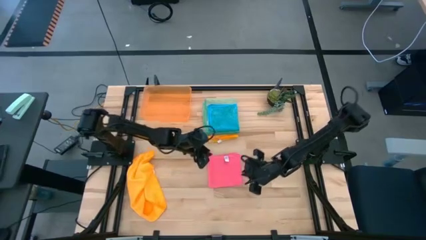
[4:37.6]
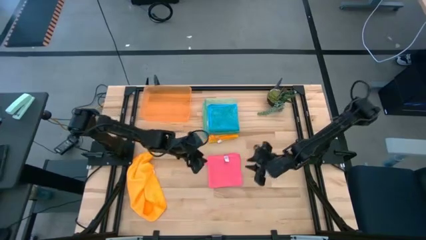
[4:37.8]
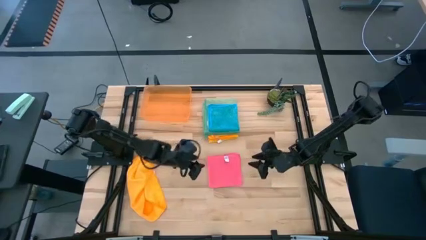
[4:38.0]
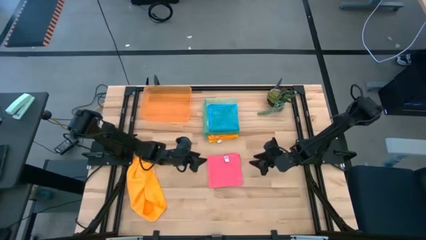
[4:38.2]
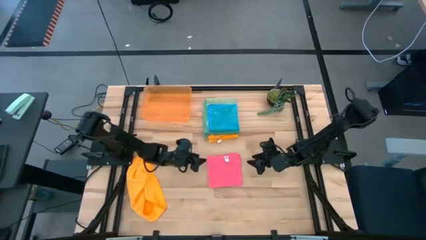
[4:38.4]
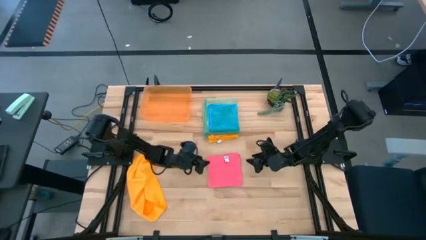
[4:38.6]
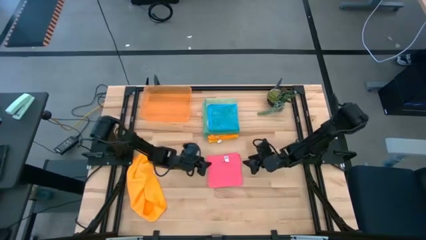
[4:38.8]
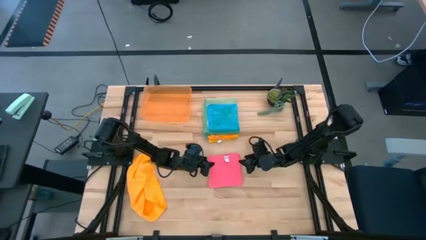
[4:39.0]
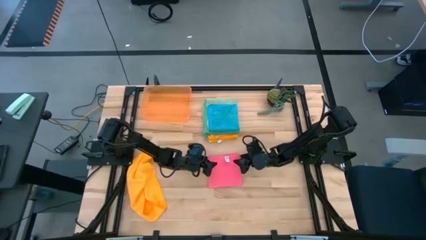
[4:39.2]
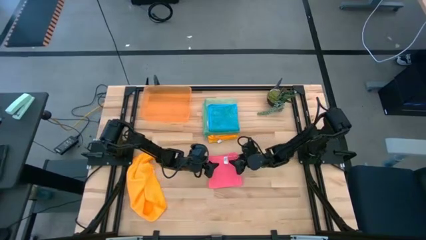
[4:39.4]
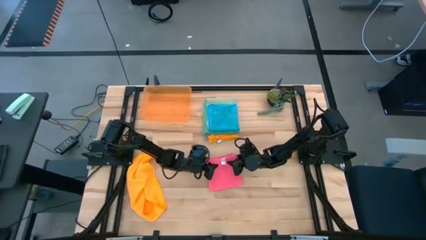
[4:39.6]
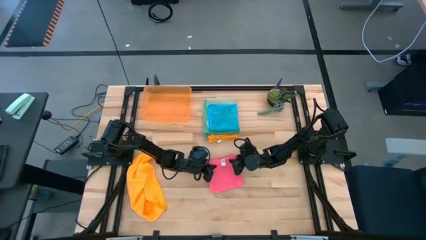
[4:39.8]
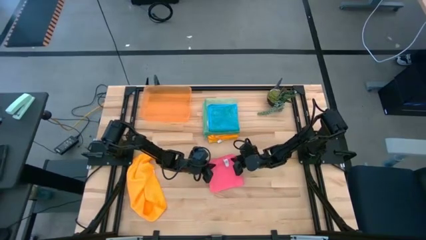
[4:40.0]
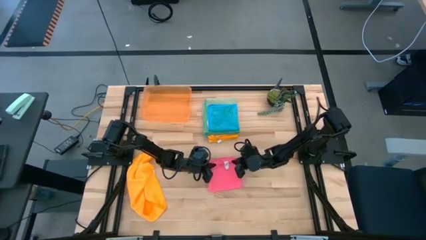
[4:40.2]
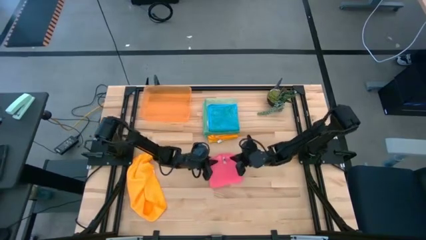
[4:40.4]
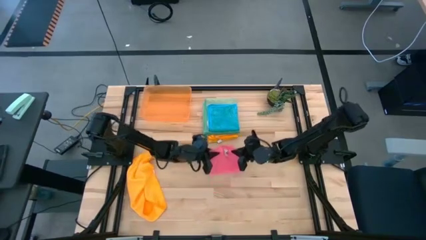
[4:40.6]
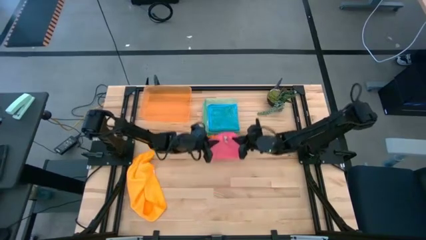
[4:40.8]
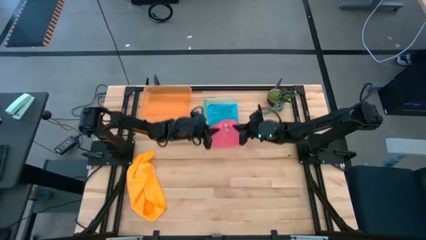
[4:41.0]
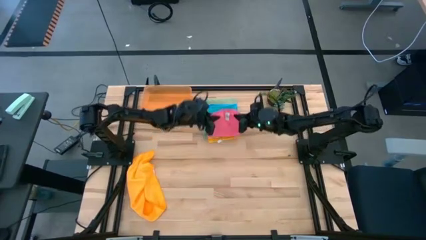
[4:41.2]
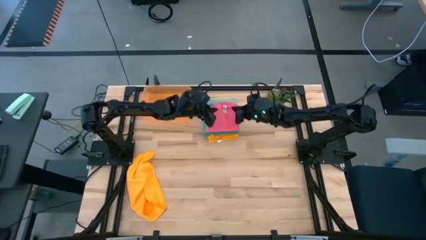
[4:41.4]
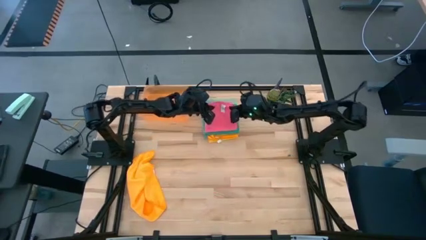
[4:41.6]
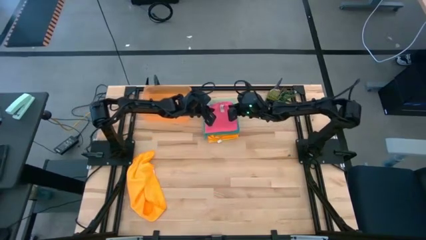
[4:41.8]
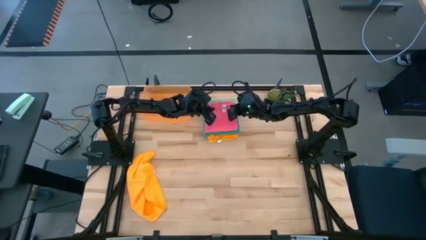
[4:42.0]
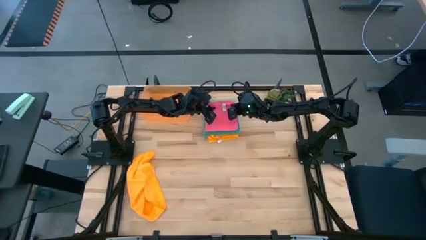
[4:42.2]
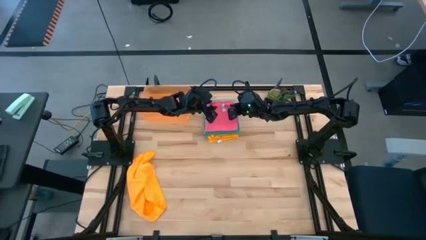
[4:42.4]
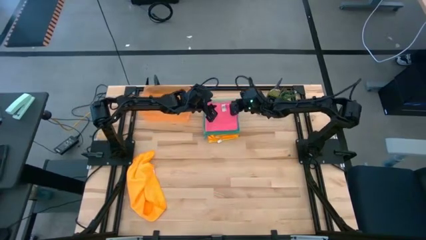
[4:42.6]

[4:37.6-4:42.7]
Task: Fold microfiber towels
Stack the folded pink towel on the folded blue towel

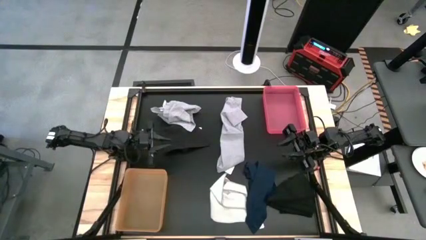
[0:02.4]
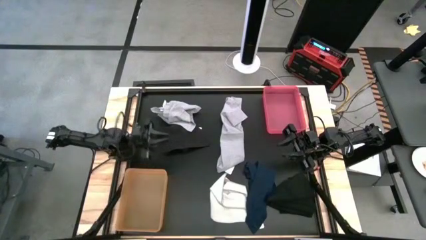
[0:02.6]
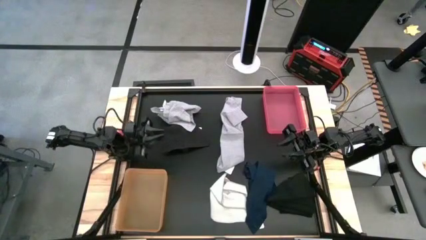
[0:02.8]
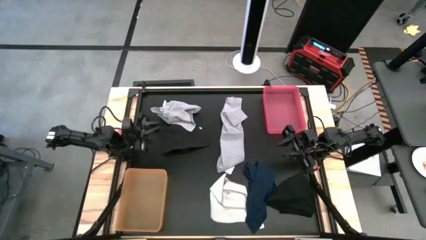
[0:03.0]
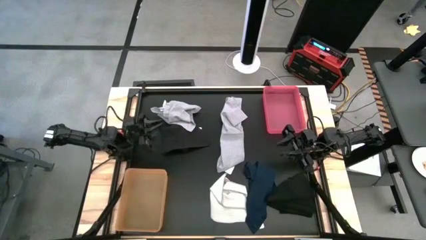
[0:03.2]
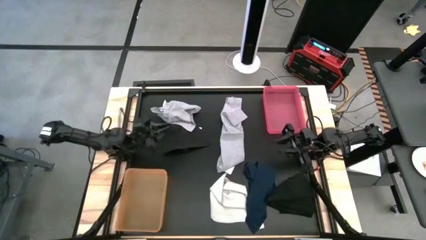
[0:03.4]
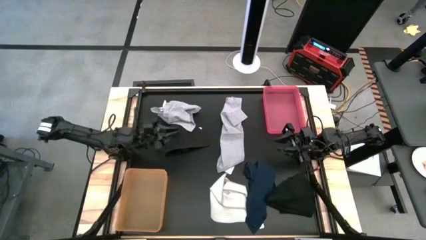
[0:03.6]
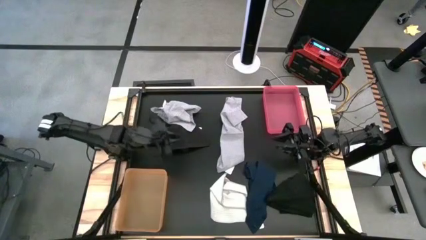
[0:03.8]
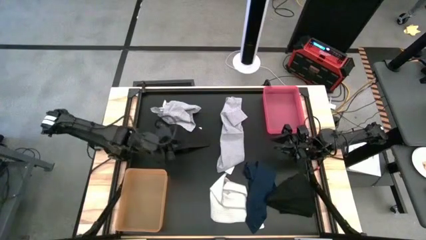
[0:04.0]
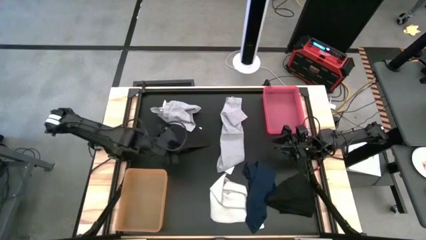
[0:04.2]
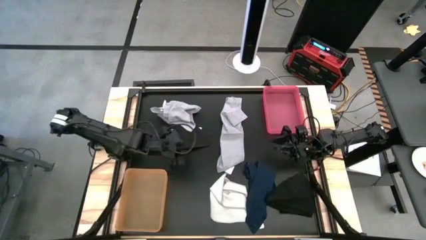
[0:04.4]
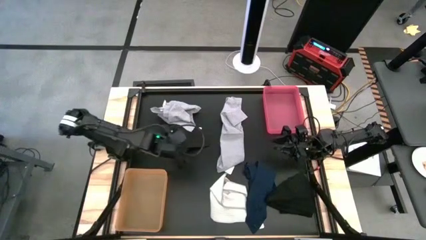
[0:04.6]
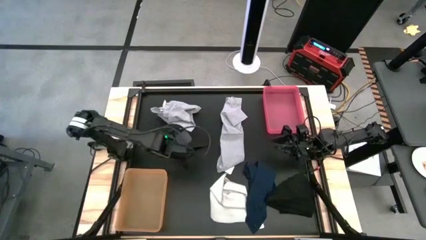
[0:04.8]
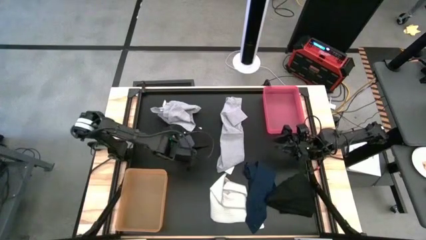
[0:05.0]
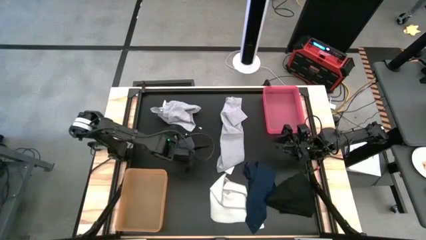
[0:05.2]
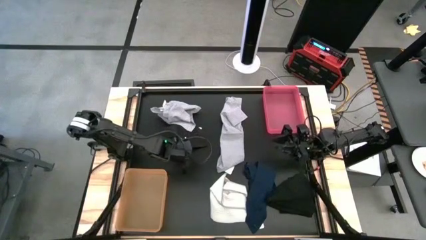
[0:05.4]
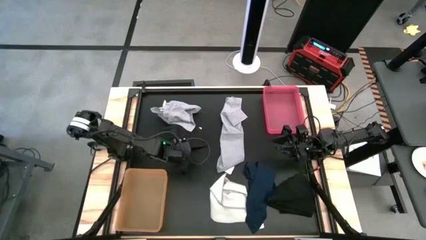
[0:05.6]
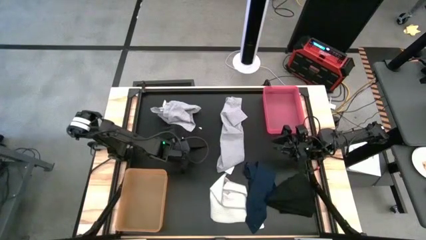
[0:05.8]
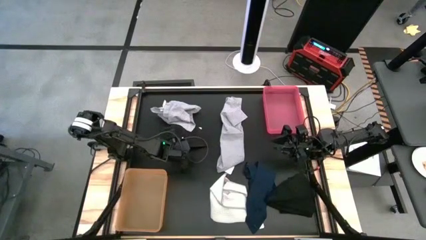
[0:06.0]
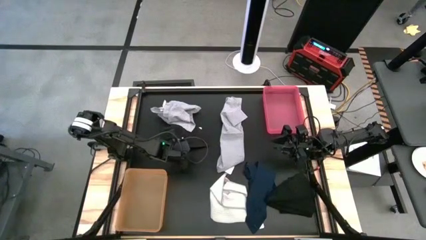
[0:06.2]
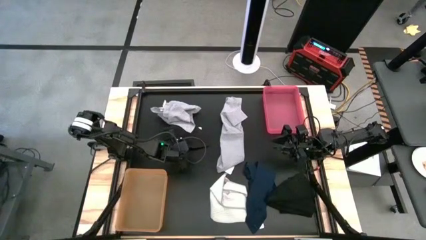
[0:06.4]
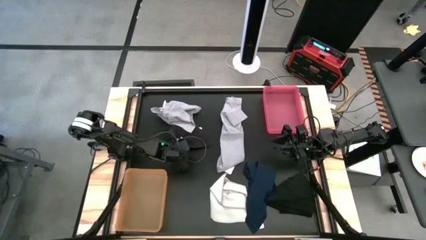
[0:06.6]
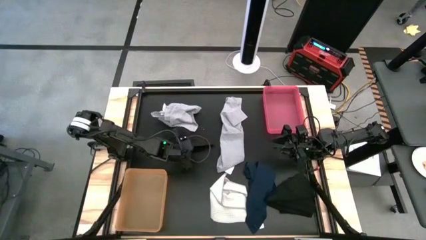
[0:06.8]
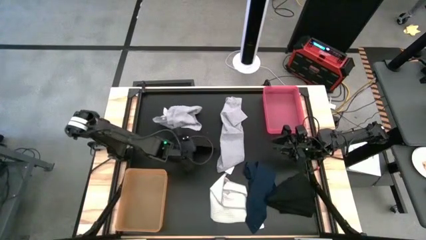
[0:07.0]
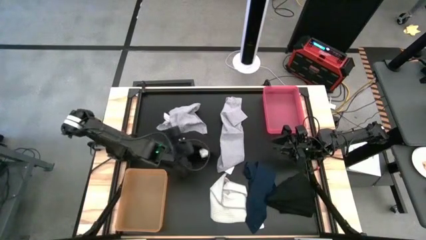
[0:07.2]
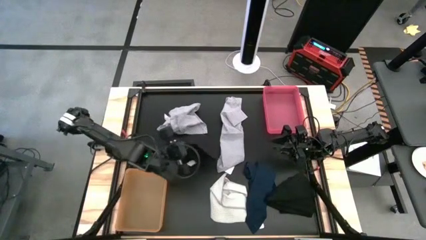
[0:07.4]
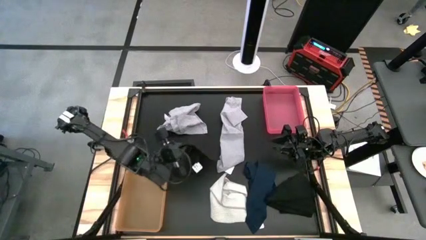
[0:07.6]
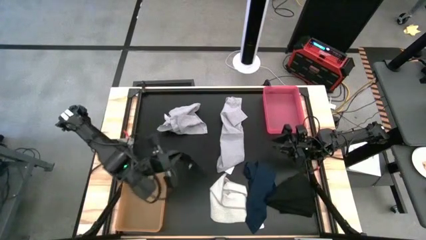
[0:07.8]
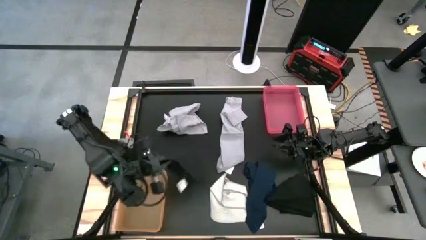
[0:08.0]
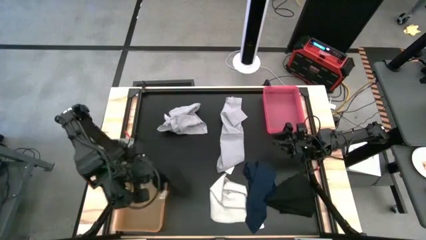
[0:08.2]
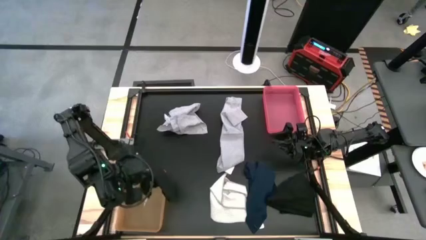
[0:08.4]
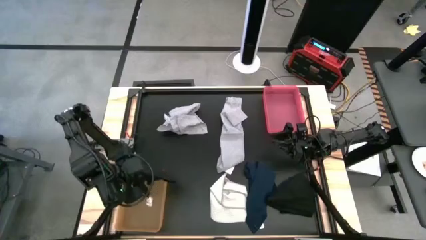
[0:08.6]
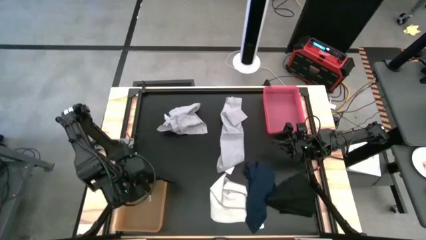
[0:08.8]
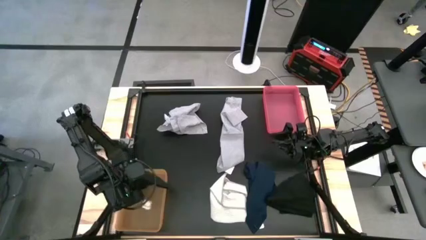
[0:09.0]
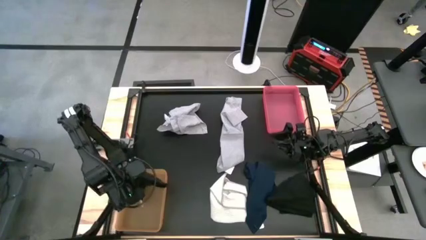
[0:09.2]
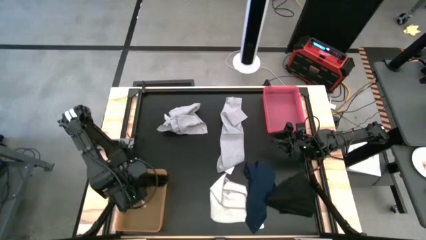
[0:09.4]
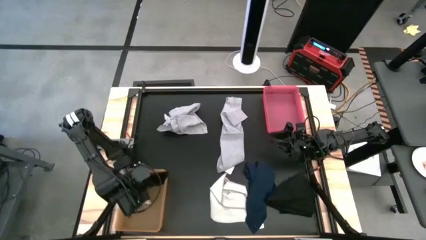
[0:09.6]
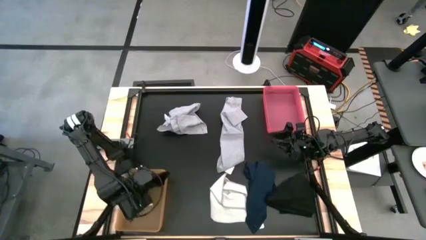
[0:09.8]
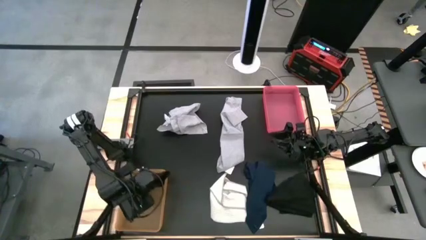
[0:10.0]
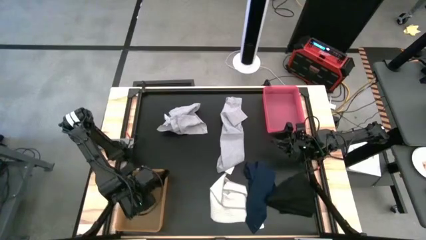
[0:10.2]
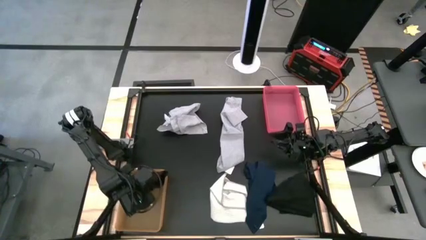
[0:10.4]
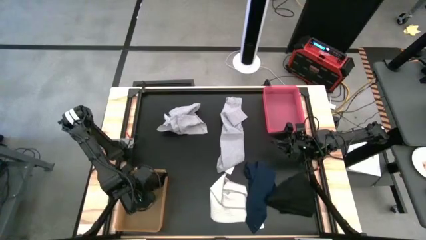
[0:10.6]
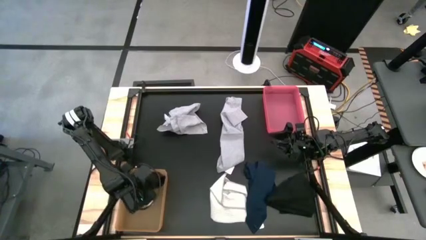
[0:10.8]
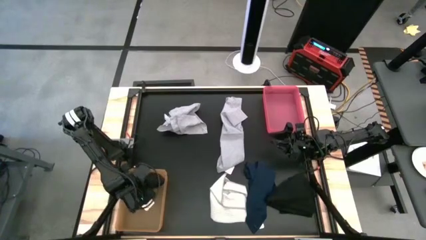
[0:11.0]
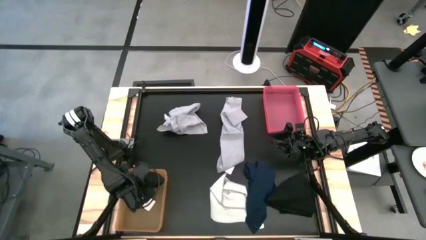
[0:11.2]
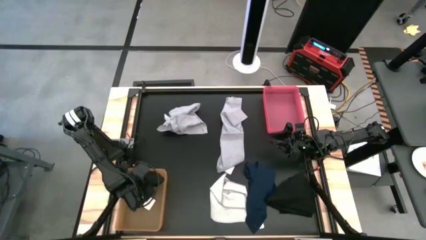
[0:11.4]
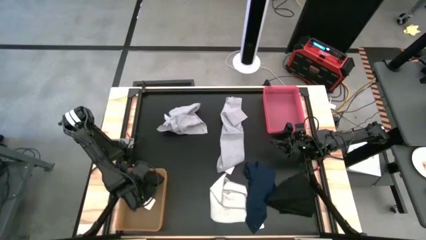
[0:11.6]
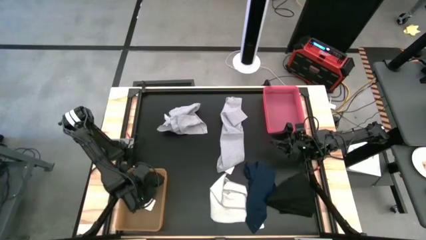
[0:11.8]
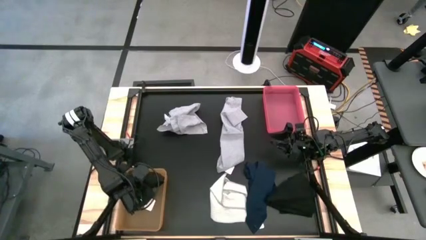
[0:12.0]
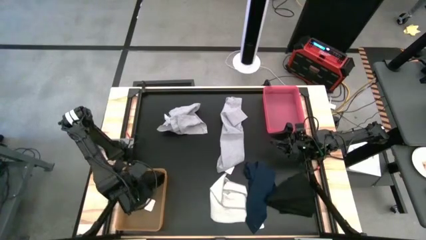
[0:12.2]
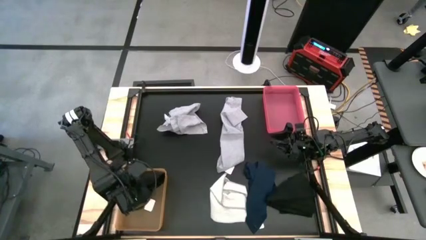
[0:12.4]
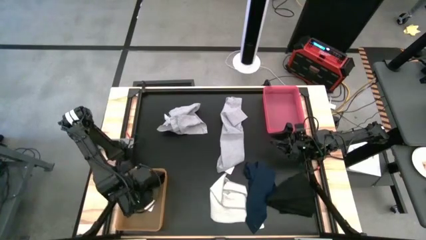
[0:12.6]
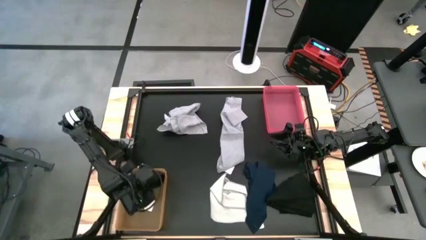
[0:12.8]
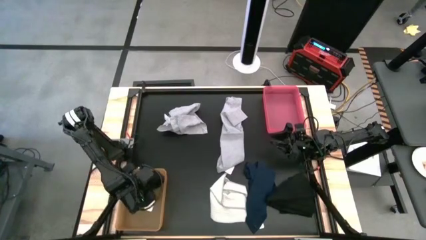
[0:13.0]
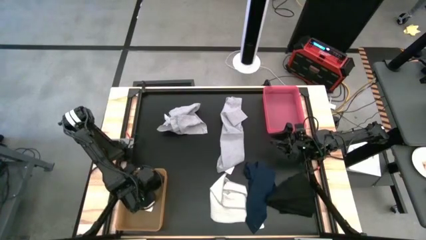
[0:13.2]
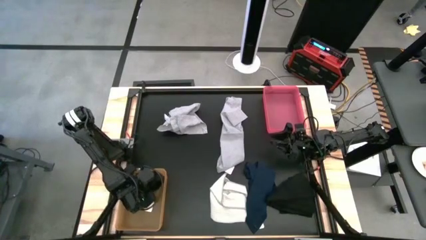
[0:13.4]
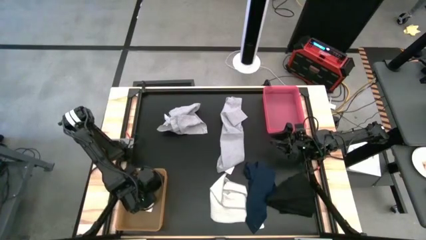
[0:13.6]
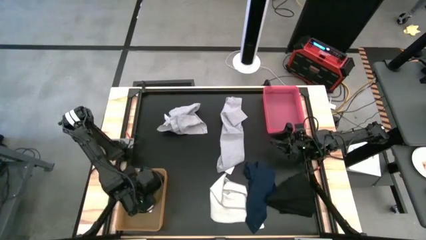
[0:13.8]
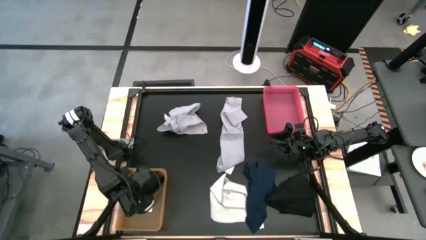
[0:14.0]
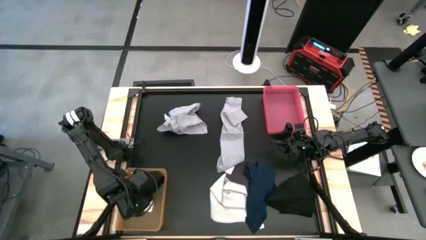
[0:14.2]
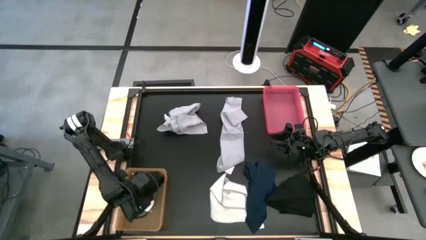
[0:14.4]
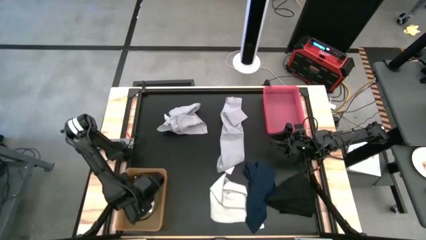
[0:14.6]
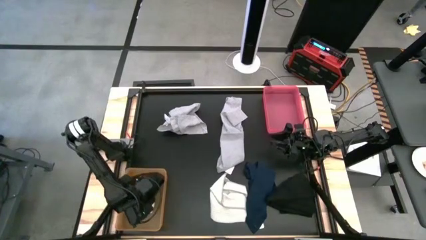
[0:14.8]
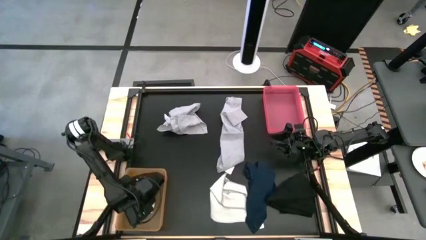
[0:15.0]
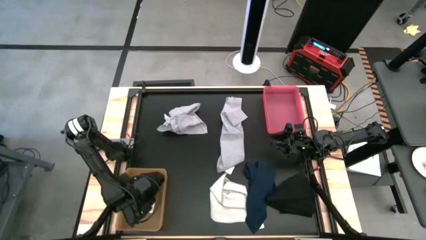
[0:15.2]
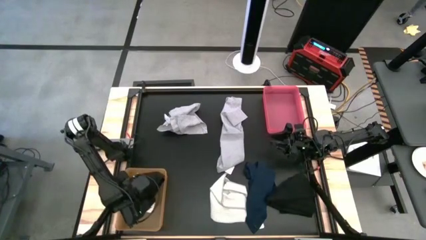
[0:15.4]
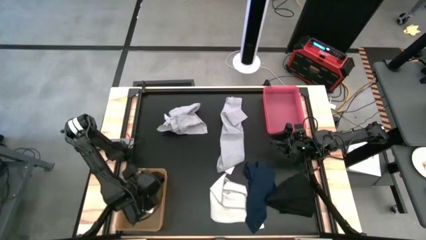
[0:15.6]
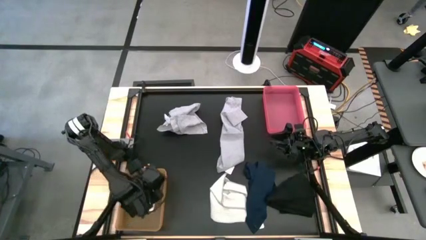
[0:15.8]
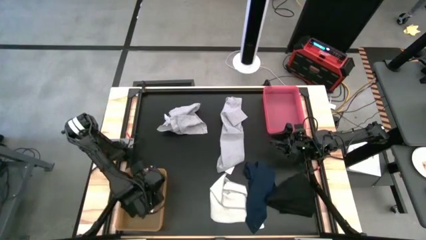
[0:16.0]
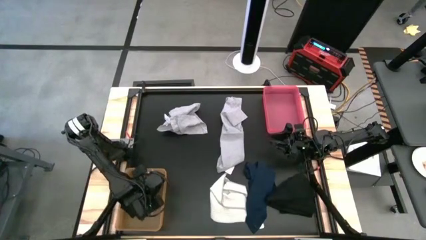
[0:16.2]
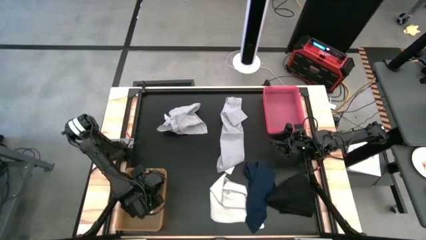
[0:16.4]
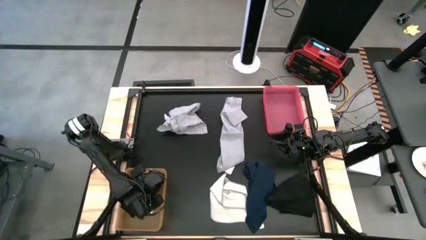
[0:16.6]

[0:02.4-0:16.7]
Task: Sort towels by color in basket
Put the top black kitchen towel into the orange bin
